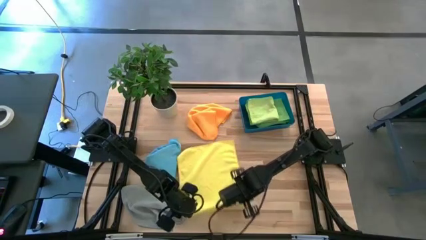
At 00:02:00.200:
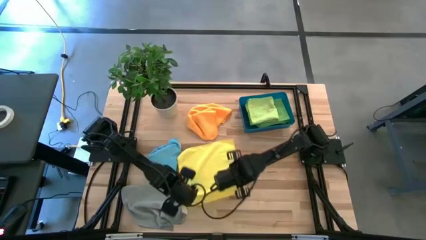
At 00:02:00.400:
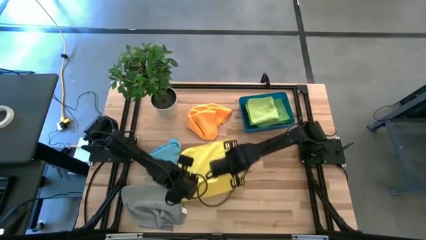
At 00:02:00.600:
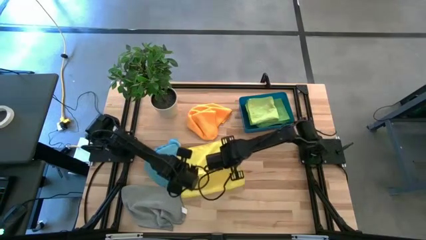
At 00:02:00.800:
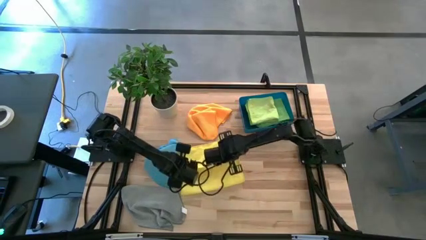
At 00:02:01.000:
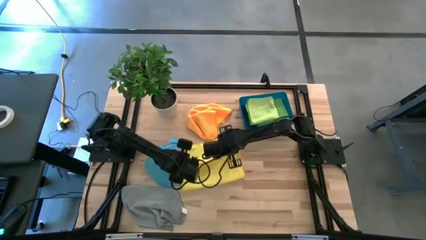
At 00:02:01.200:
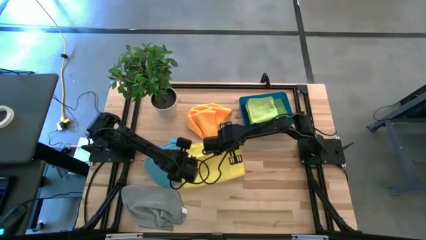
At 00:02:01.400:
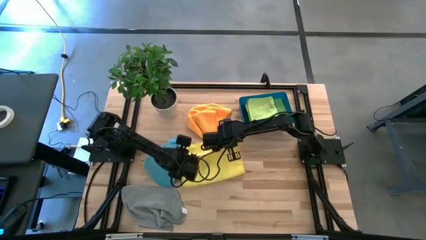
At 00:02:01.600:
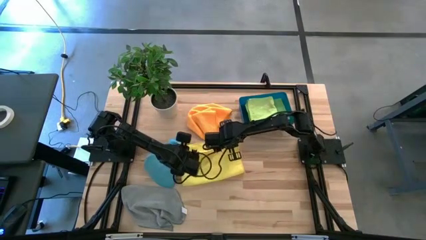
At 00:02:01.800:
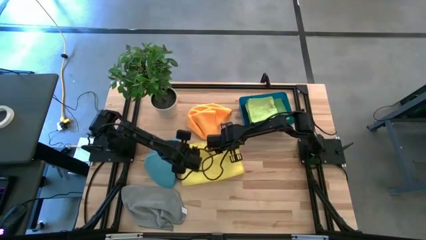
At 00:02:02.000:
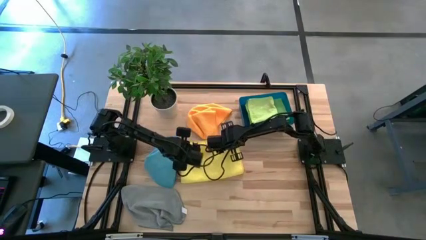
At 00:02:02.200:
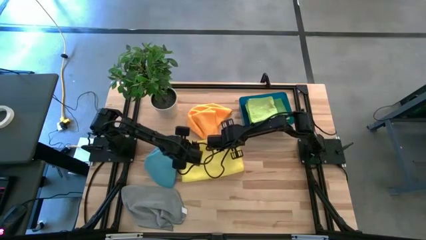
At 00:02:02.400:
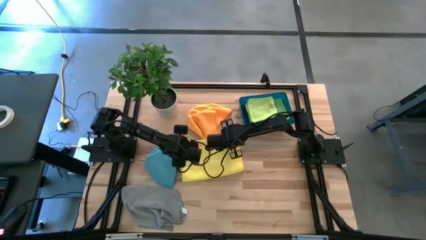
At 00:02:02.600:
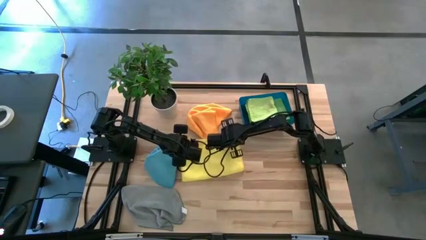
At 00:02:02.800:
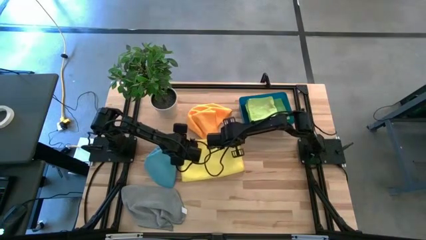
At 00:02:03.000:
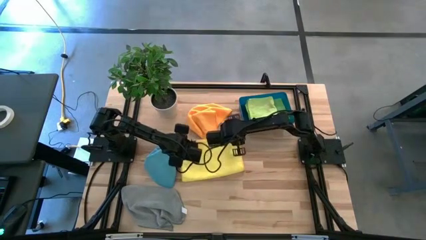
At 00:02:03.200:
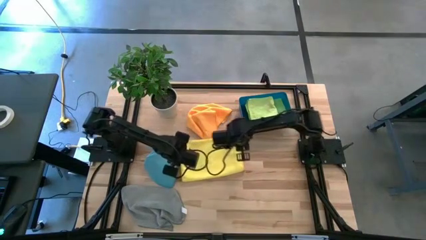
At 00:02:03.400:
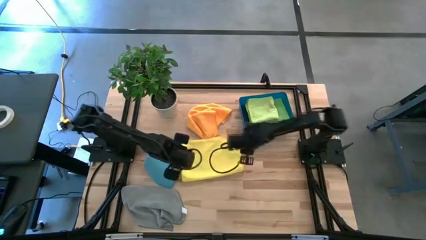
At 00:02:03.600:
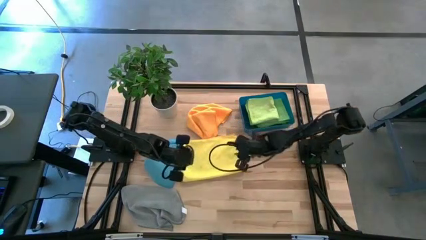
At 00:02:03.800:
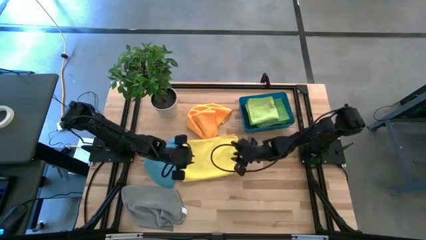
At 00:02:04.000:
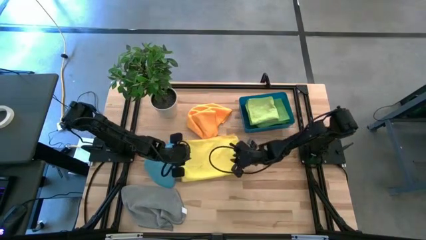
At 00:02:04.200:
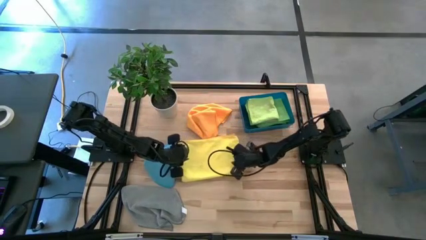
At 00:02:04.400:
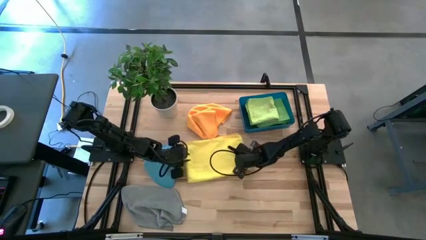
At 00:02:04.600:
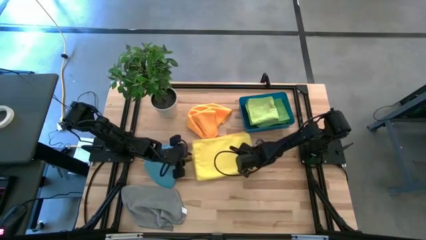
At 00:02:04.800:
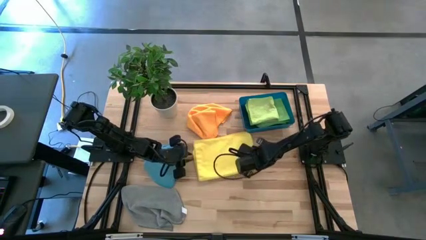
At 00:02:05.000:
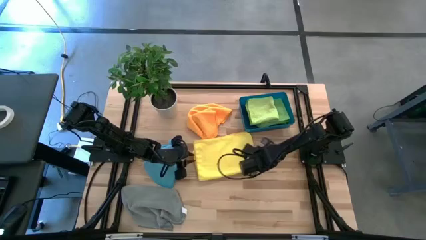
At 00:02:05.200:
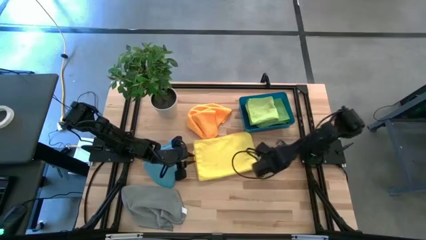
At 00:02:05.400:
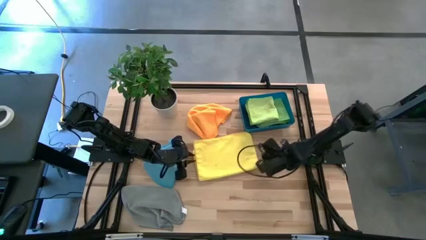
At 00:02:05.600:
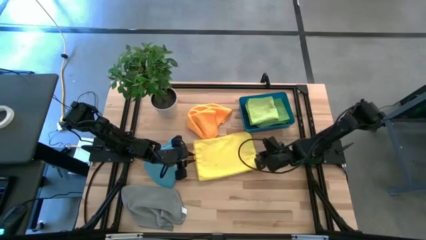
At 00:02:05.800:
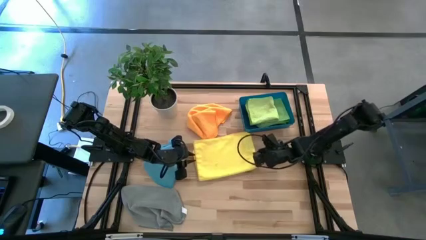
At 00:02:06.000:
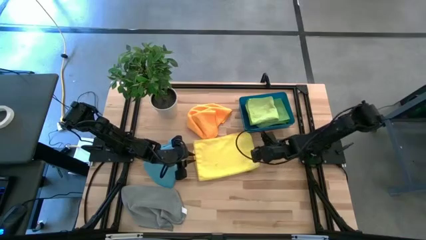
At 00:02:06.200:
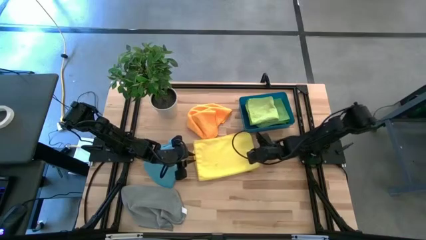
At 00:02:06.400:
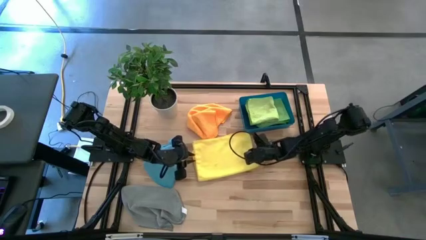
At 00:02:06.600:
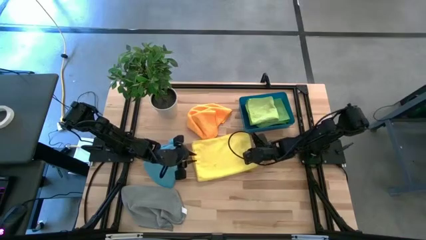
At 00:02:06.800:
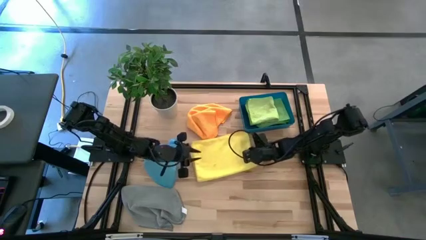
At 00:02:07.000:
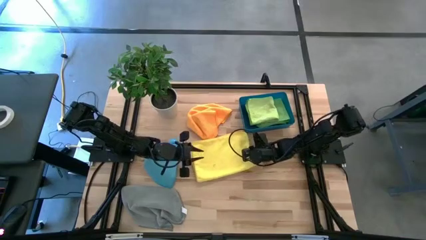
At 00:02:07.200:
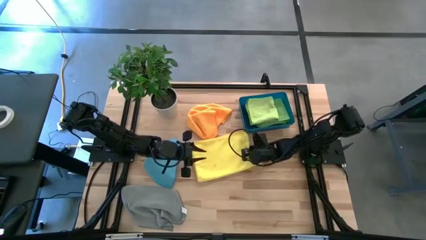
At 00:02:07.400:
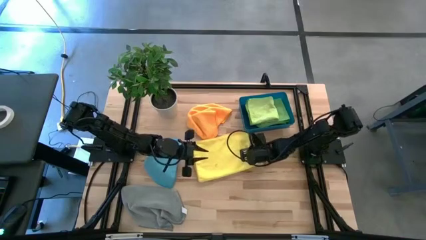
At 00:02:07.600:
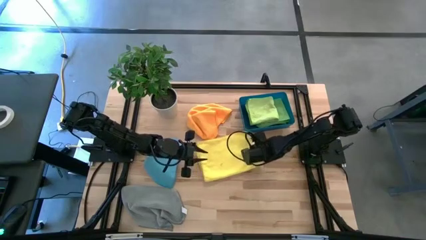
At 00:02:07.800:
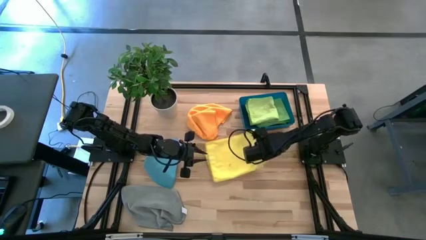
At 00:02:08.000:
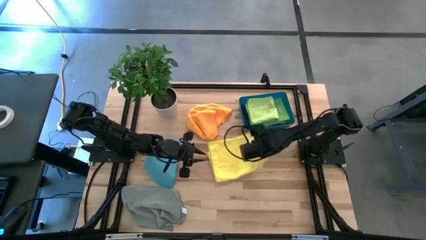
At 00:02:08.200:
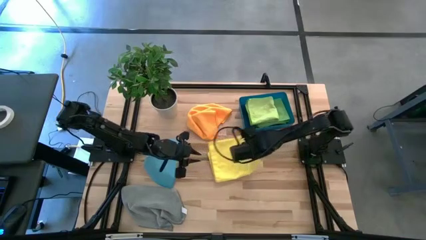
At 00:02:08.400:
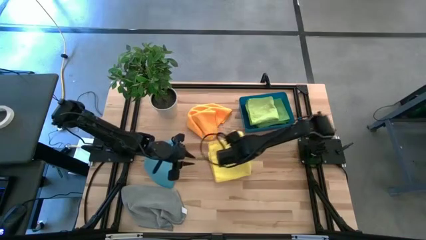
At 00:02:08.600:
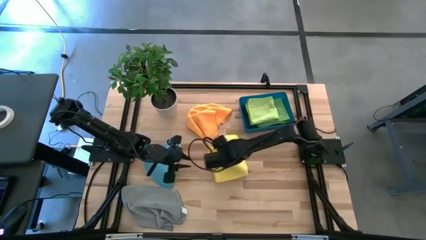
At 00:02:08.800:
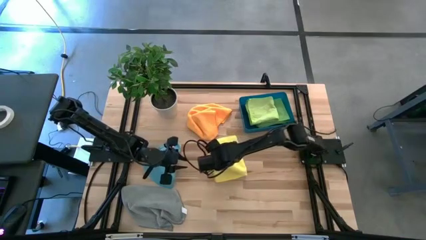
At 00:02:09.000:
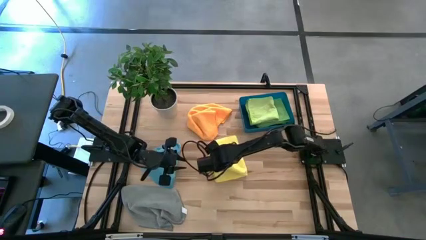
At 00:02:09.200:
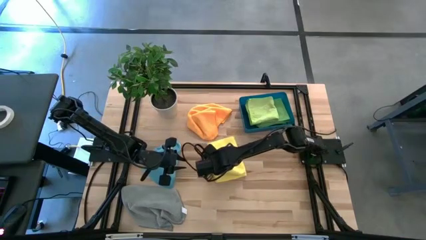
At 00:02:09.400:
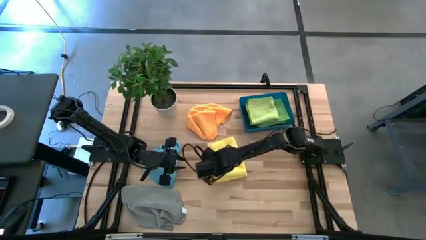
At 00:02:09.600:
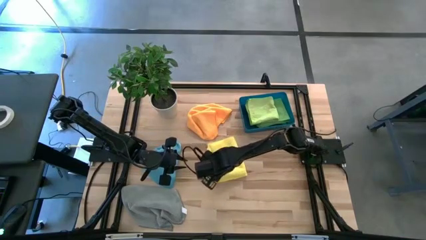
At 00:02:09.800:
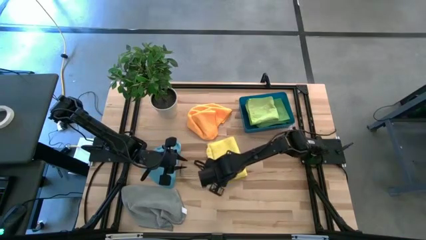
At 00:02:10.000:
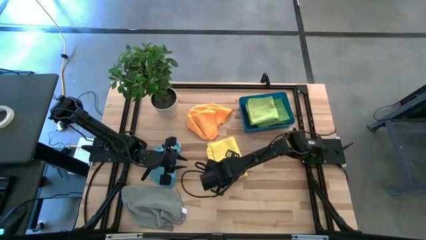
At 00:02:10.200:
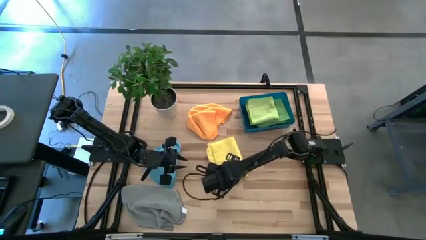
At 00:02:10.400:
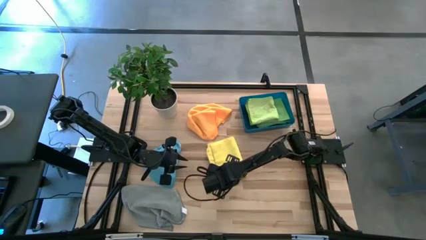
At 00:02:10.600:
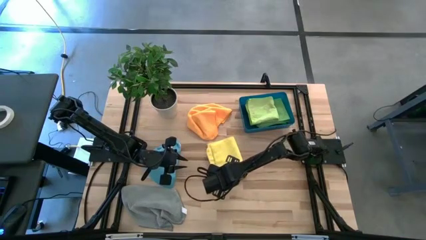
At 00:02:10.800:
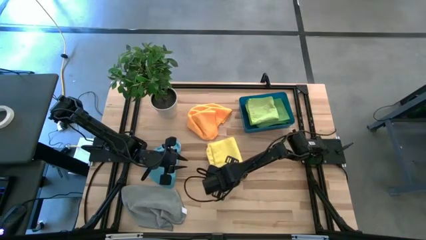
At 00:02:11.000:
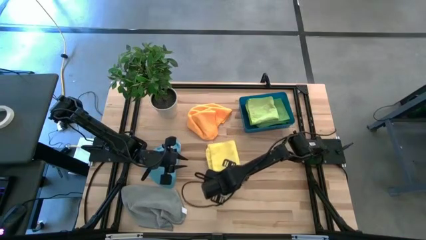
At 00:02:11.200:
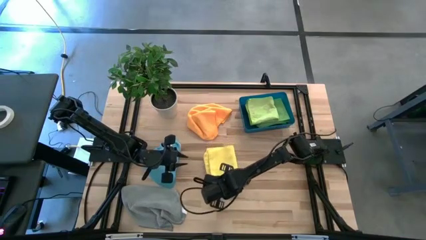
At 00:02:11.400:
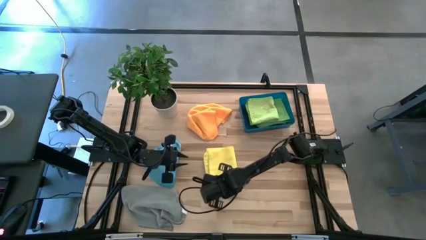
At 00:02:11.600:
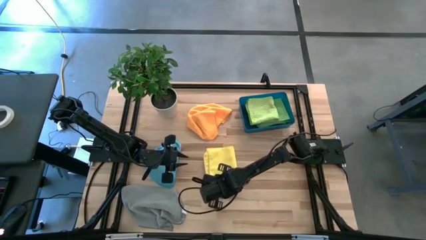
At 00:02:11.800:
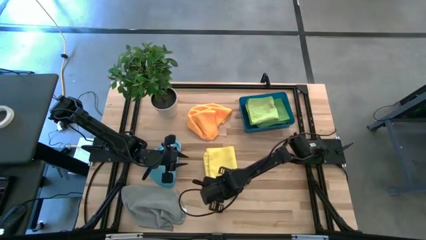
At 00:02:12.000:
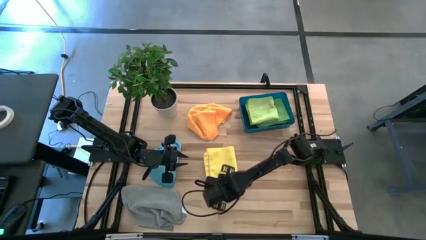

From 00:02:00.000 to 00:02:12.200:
Task: Fold microfiber towels
Fold the yellow microfiber cloth

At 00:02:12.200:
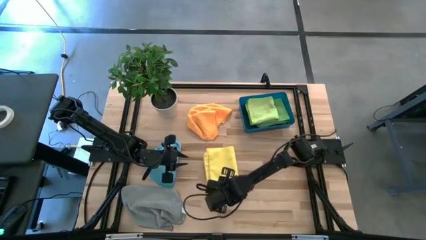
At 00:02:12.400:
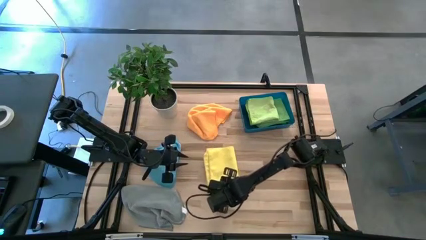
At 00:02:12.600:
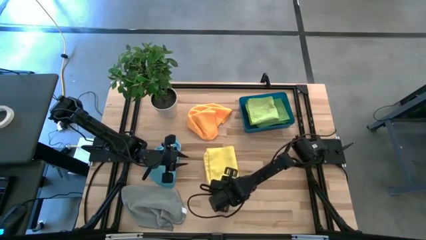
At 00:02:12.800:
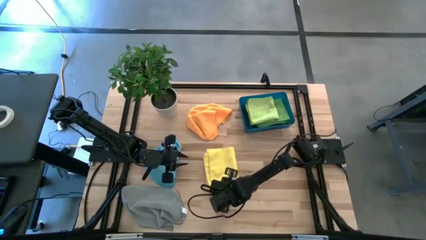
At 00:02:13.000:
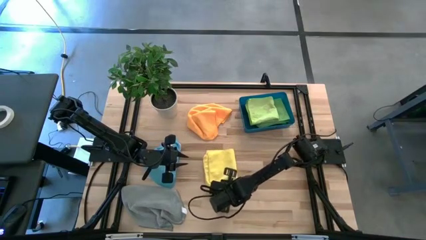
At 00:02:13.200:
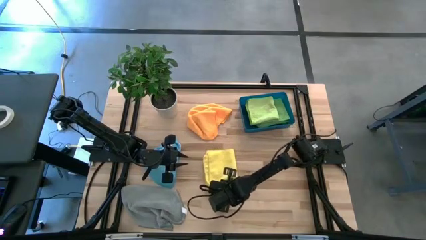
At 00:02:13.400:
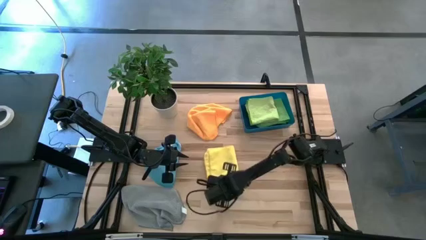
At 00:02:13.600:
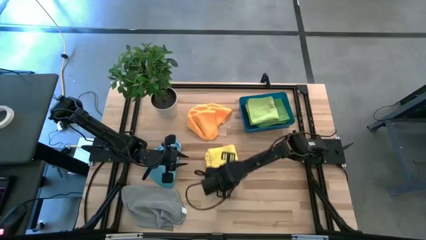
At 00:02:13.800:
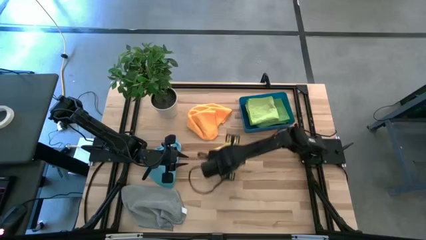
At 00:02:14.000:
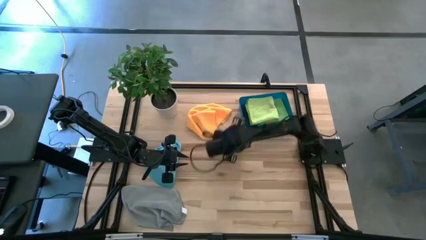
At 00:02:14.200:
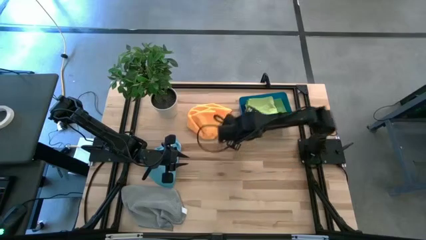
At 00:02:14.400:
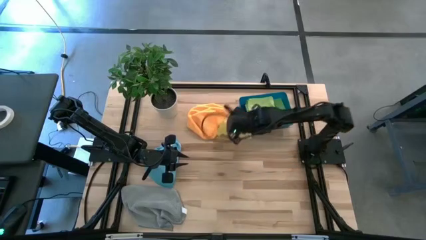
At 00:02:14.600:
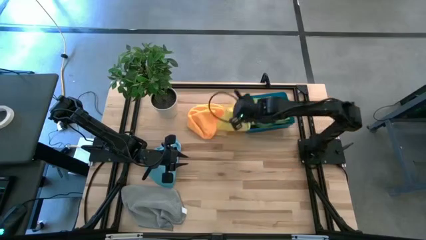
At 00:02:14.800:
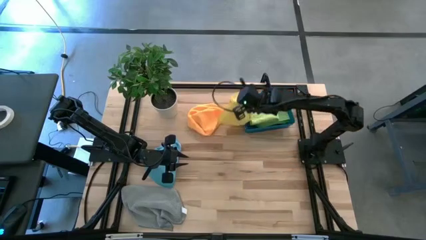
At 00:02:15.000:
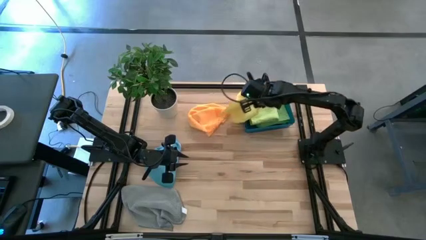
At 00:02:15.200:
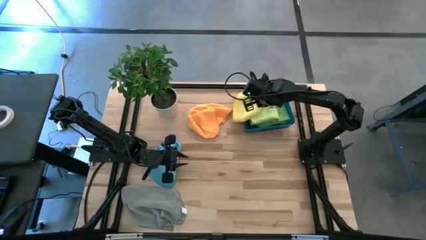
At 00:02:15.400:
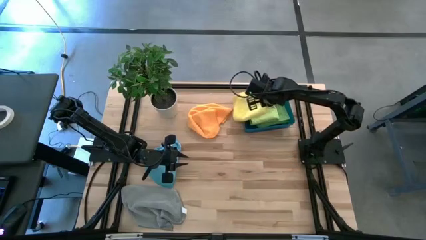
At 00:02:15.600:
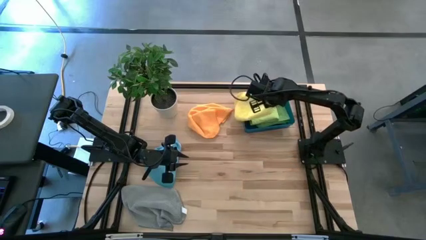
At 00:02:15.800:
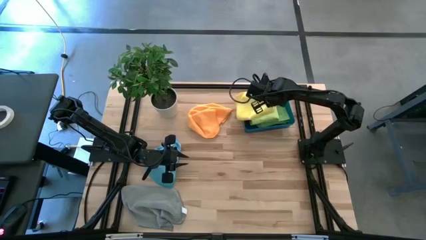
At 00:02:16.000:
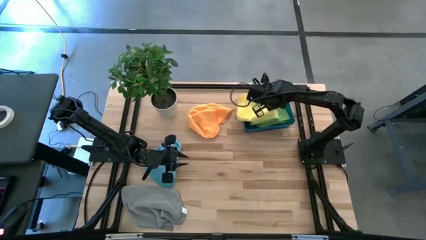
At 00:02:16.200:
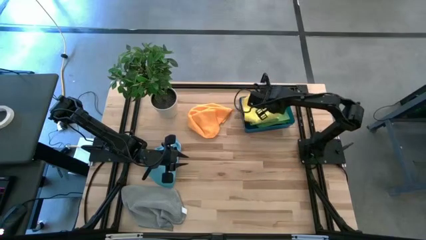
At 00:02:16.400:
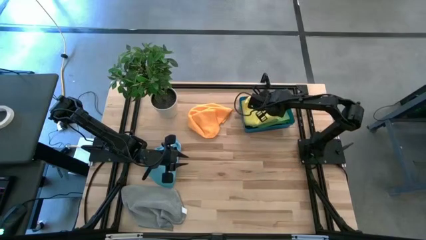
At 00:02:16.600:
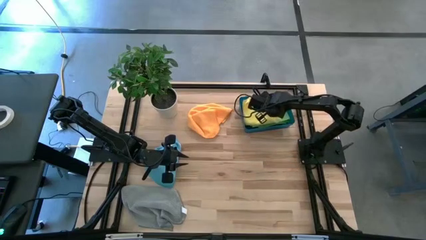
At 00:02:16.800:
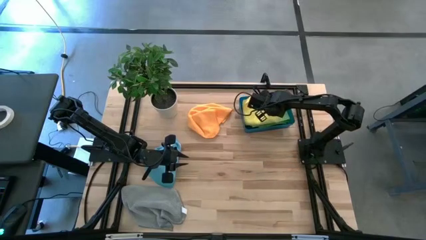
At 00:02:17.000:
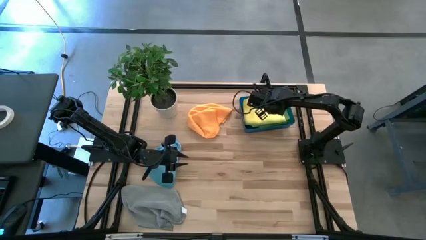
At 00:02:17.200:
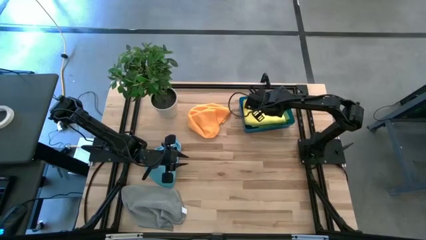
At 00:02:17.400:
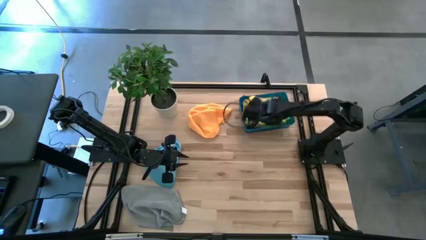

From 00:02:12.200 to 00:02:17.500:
Put the yellow microfiber cloth into the blue bin
